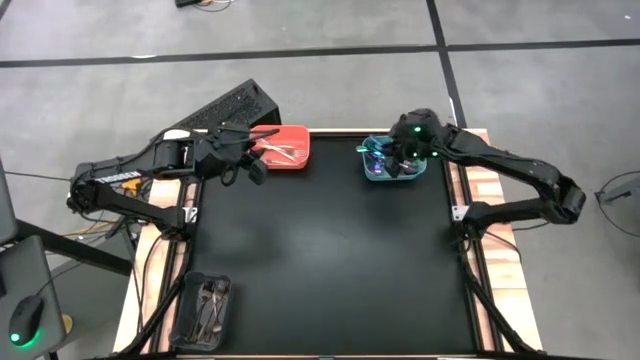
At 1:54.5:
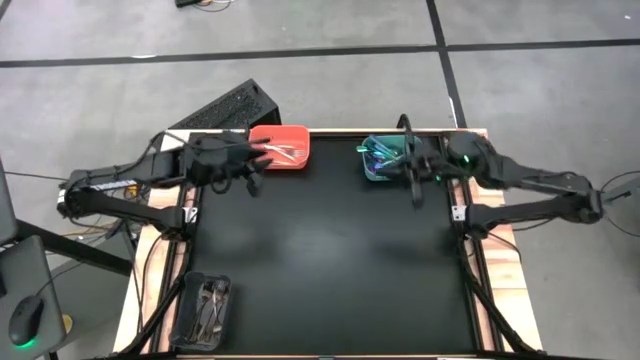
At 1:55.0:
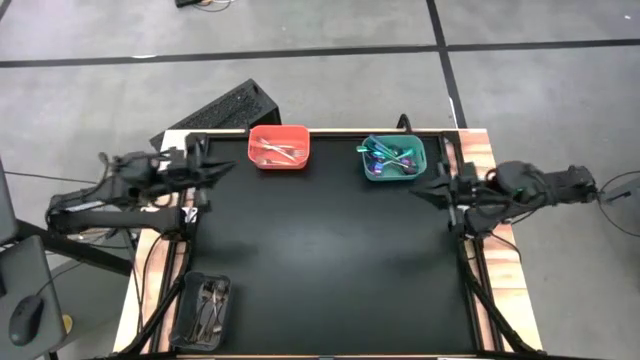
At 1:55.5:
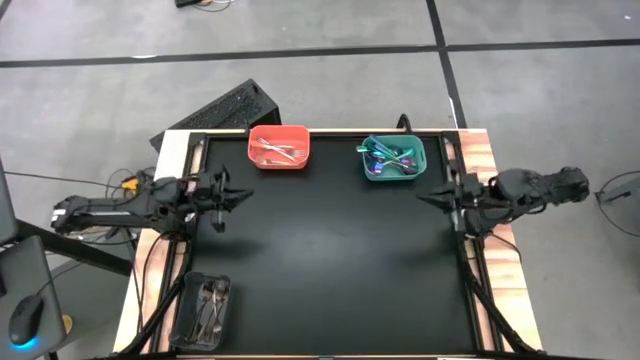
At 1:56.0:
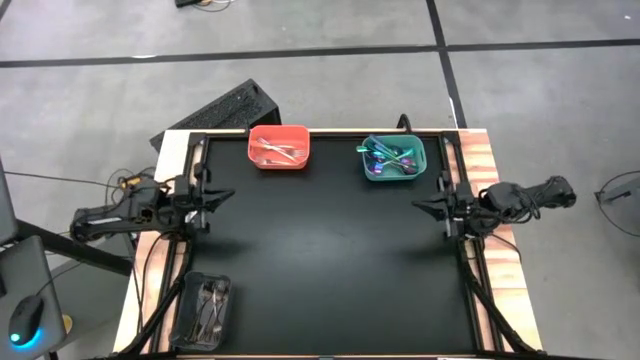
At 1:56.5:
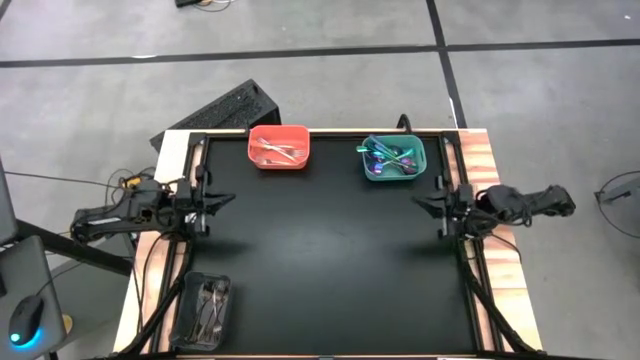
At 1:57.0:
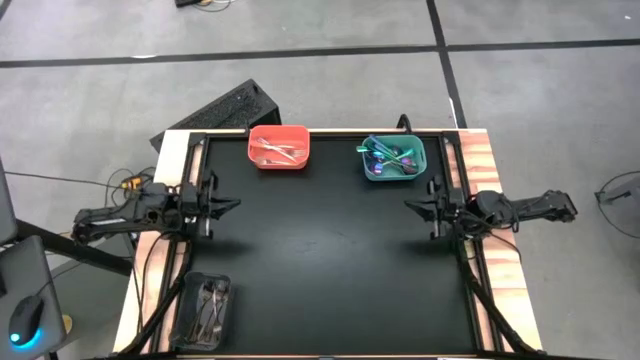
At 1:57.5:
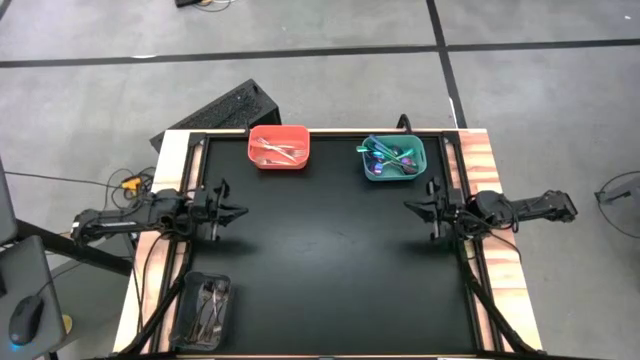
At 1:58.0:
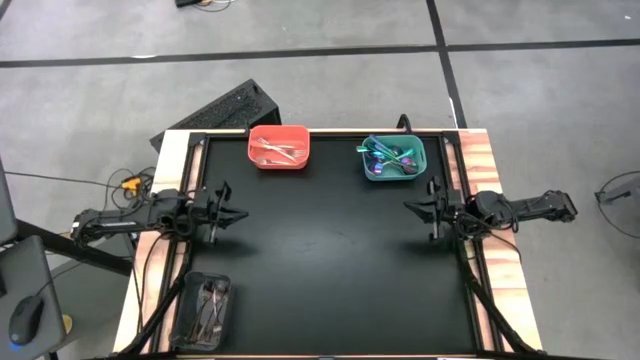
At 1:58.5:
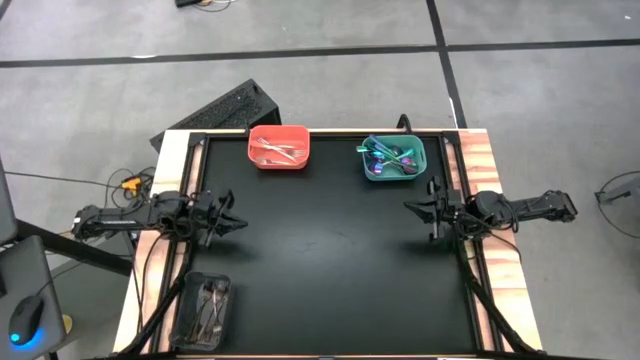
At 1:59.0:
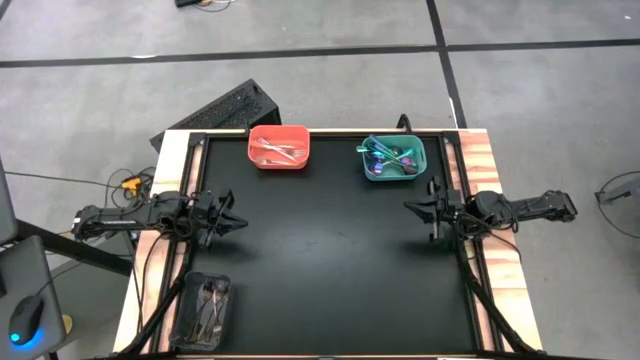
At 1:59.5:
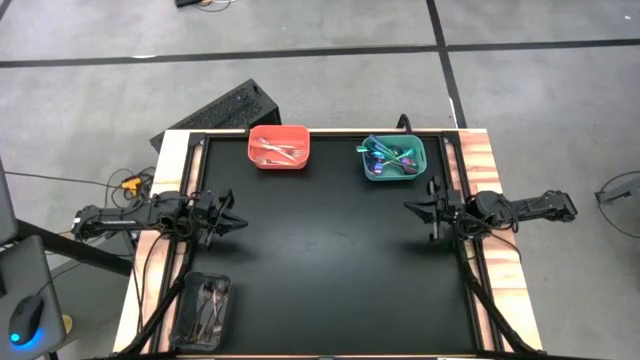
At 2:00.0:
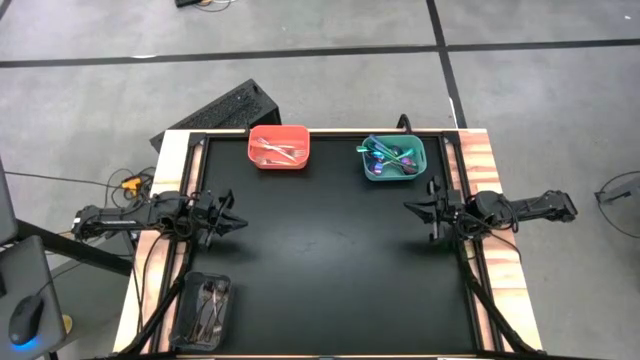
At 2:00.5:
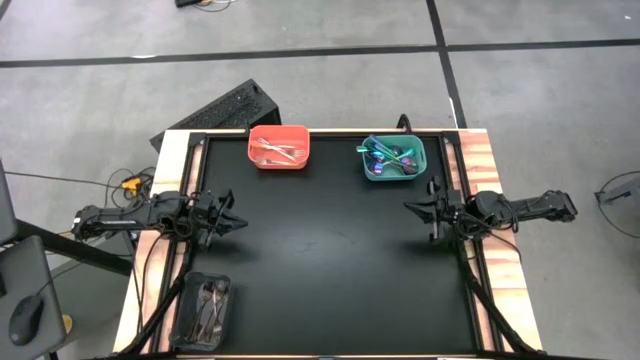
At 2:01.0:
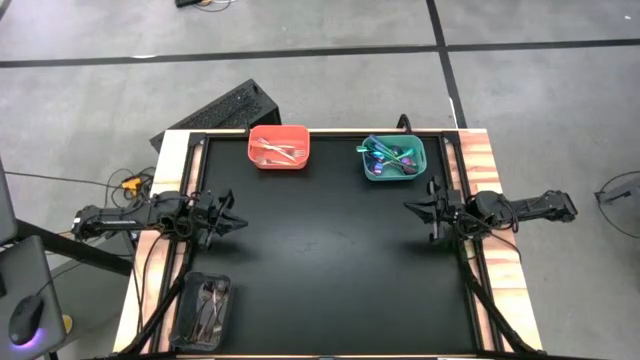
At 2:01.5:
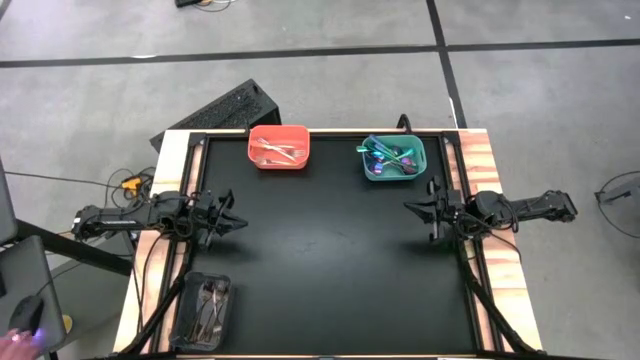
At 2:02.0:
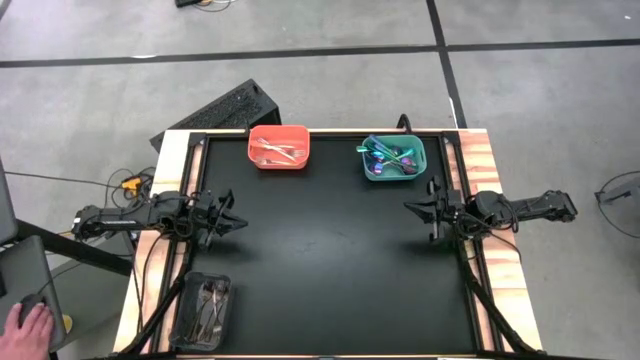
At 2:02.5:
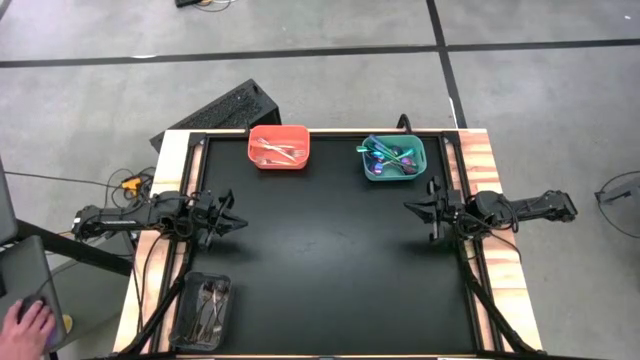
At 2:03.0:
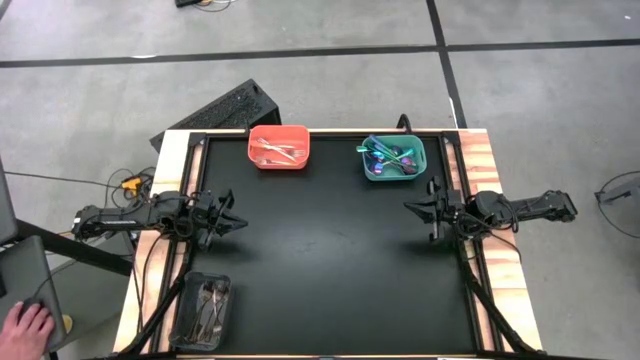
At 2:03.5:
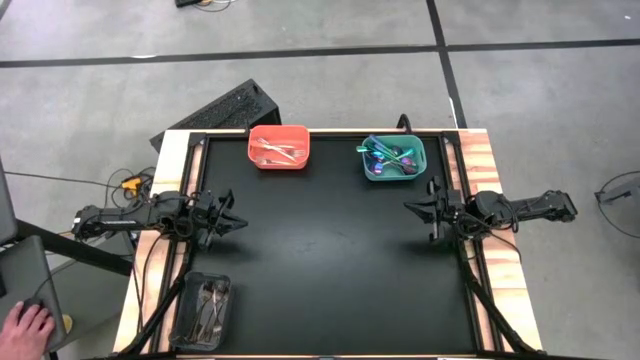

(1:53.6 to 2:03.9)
Task: Sort silverware by color (type)
Return to Home Position

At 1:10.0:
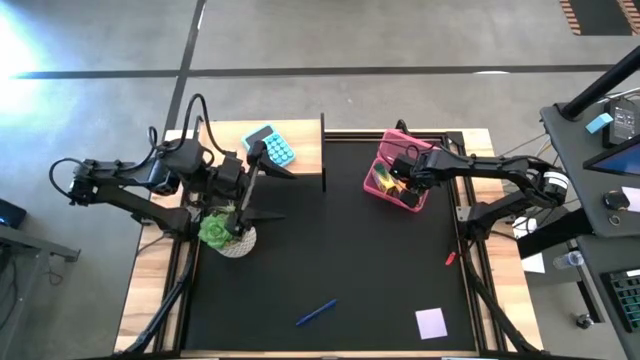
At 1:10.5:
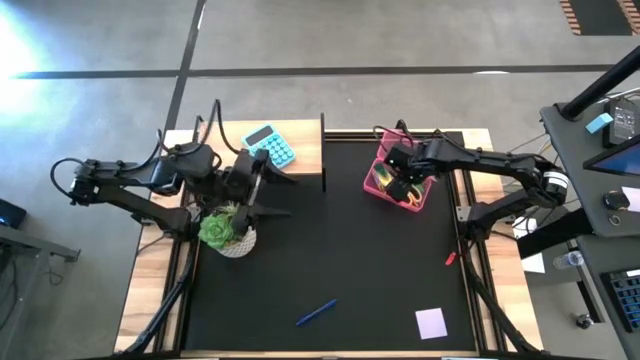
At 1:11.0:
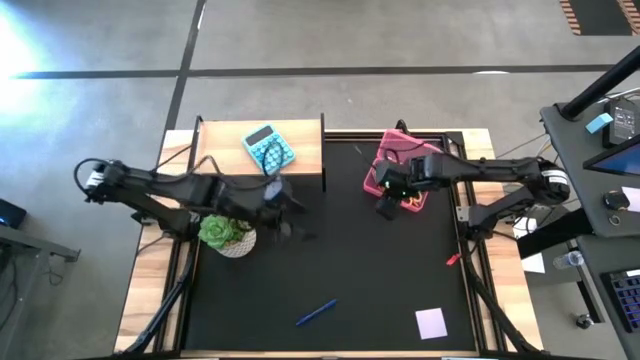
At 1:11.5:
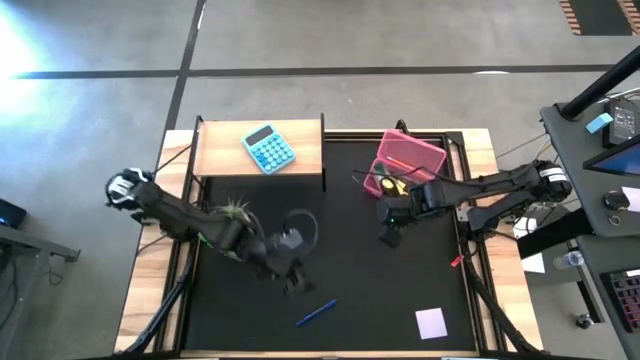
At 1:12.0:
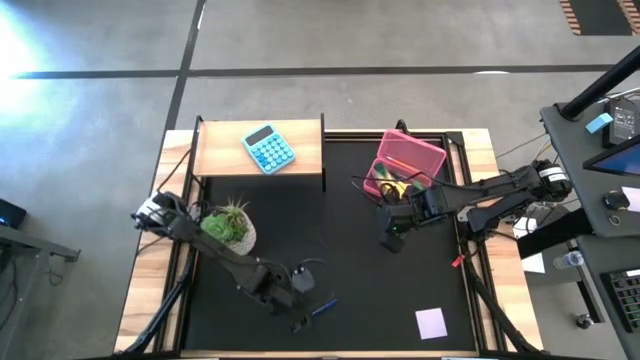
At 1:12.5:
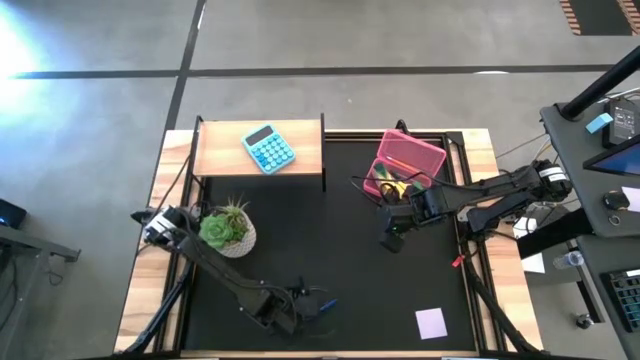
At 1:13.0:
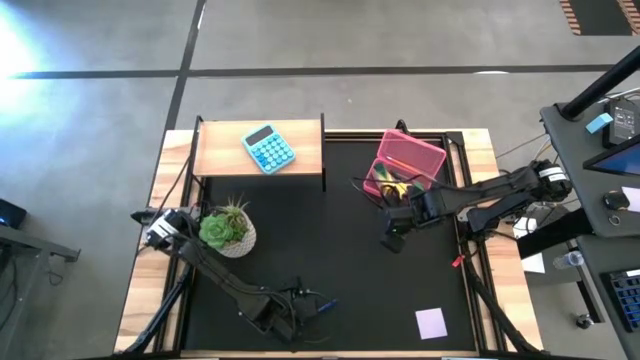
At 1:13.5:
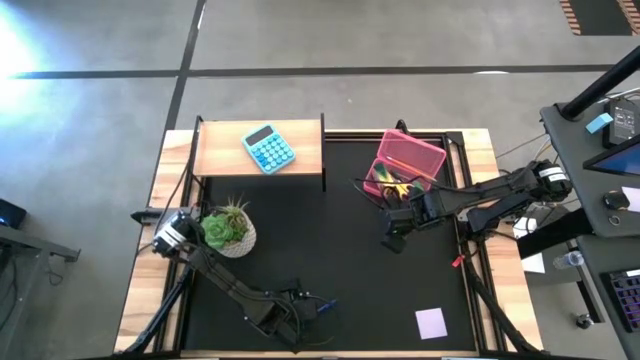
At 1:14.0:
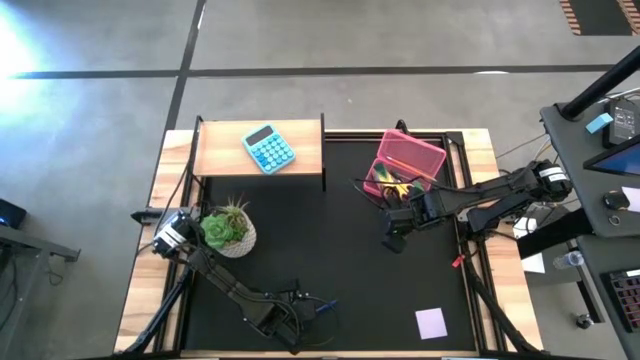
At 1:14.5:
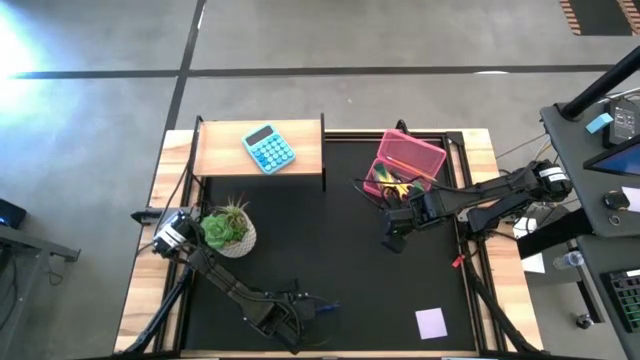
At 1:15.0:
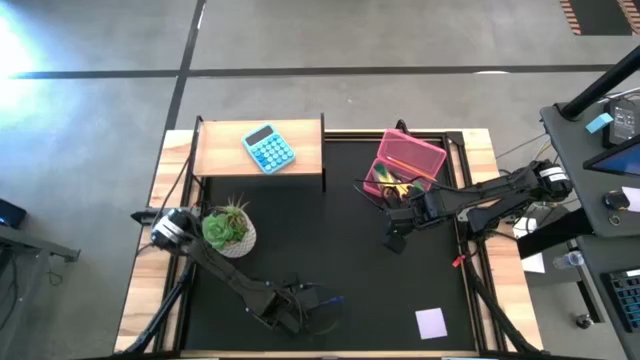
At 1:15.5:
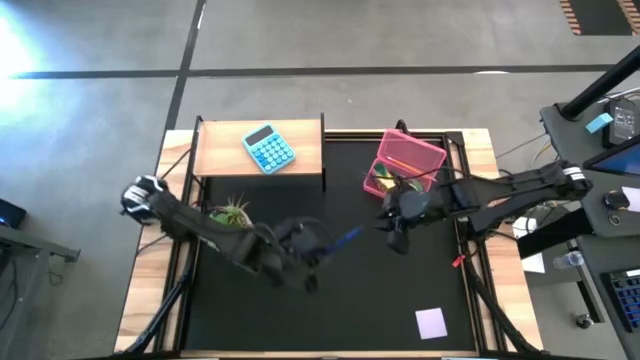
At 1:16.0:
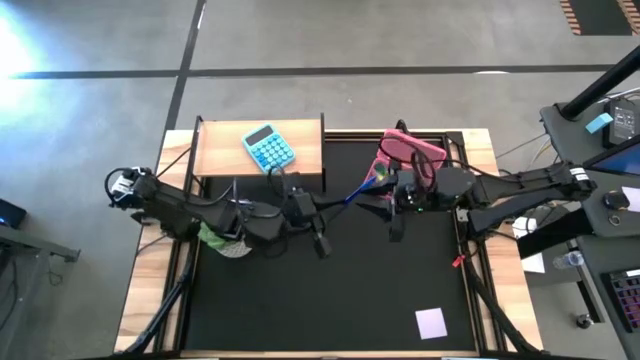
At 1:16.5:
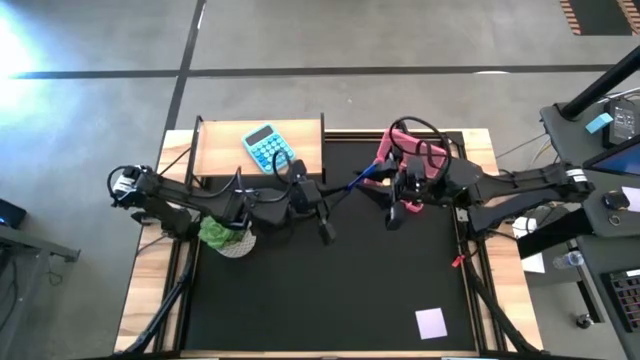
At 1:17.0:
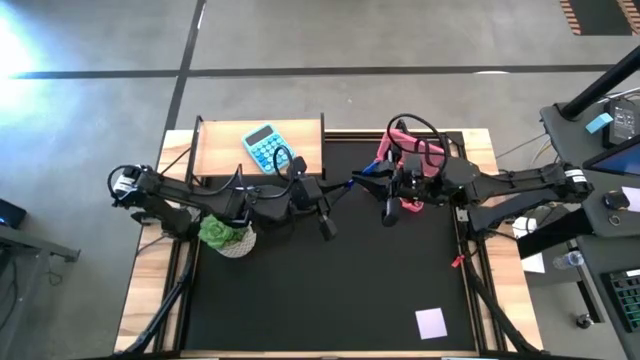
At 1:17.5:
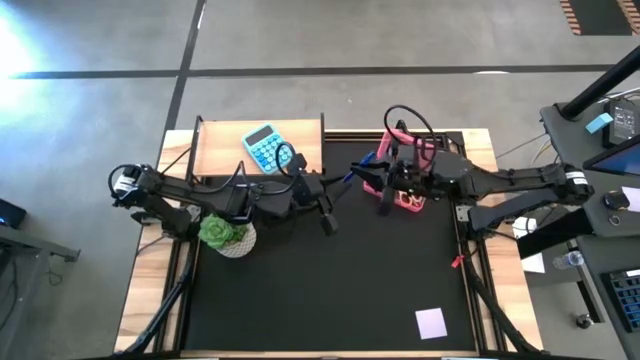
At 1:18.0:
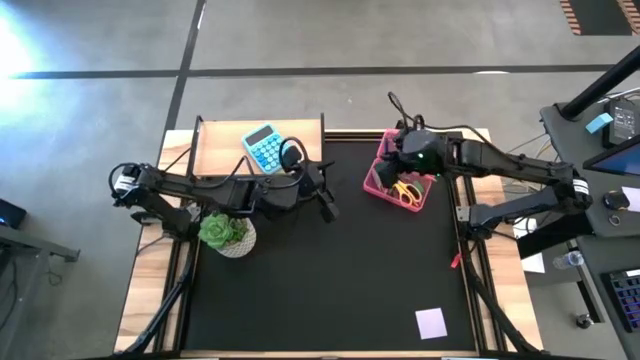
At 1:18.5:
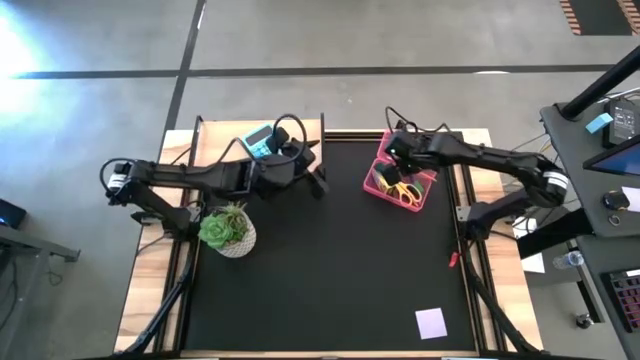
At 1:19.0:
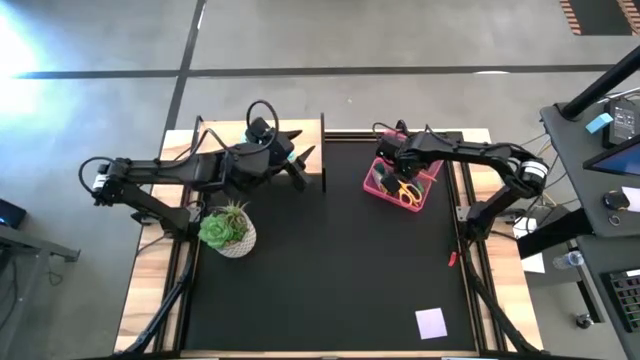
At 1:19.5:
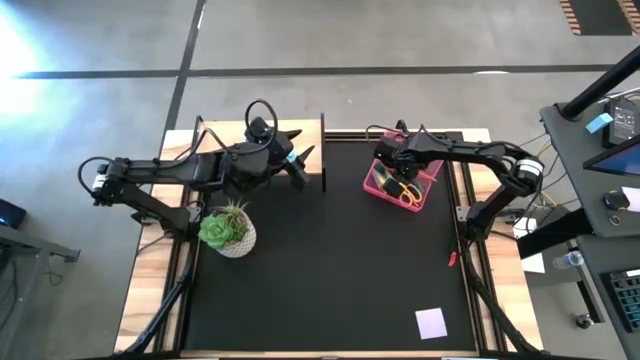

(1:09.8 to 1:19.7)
Task: Pack school essentials
Put the blue pen into the pink supply box
